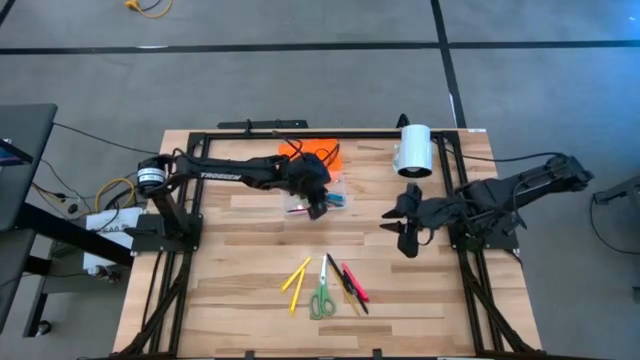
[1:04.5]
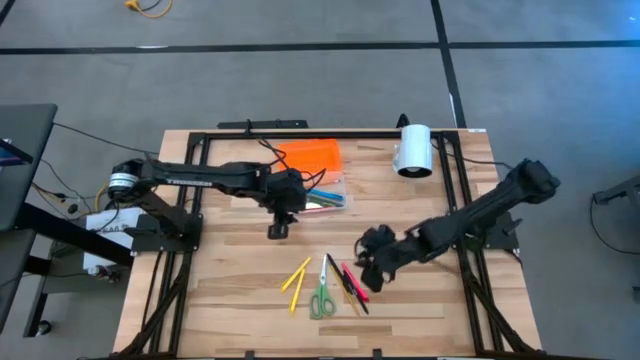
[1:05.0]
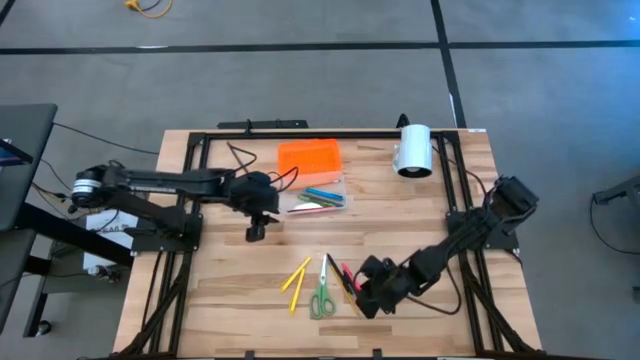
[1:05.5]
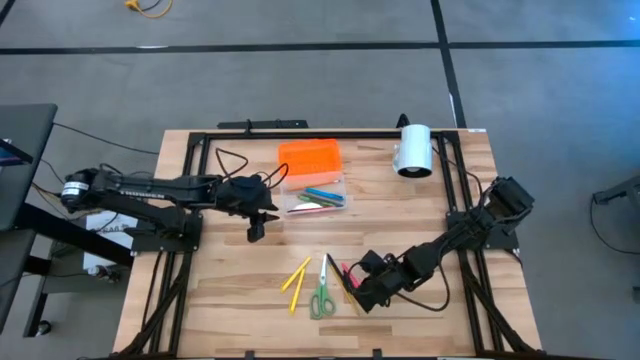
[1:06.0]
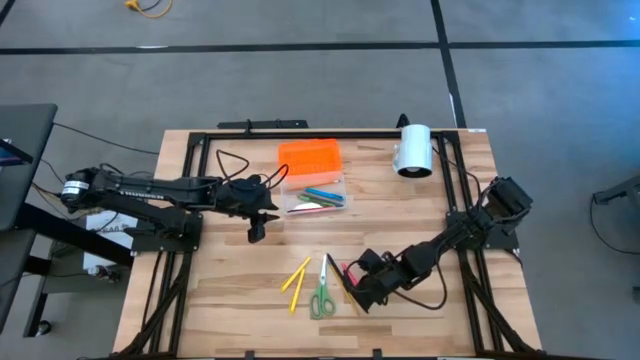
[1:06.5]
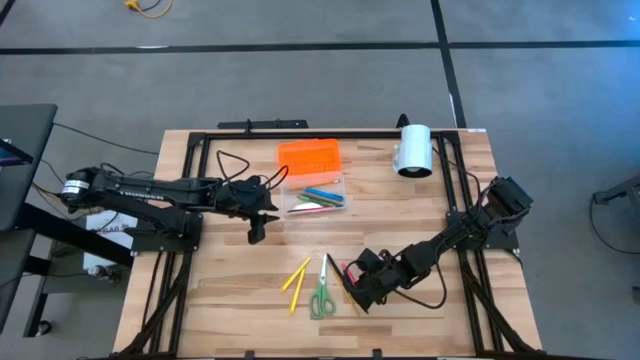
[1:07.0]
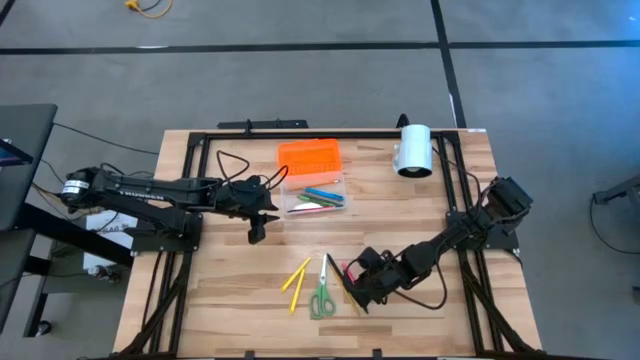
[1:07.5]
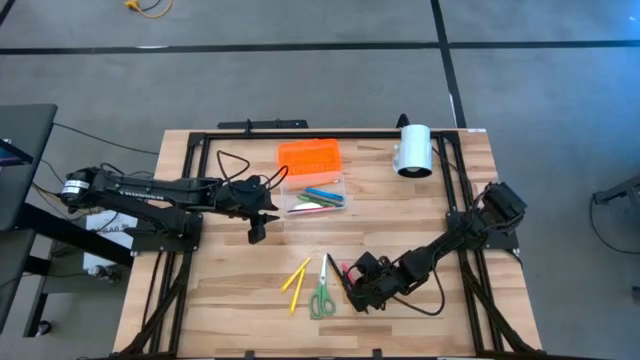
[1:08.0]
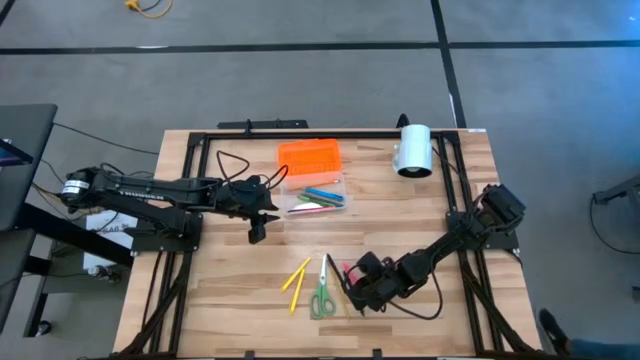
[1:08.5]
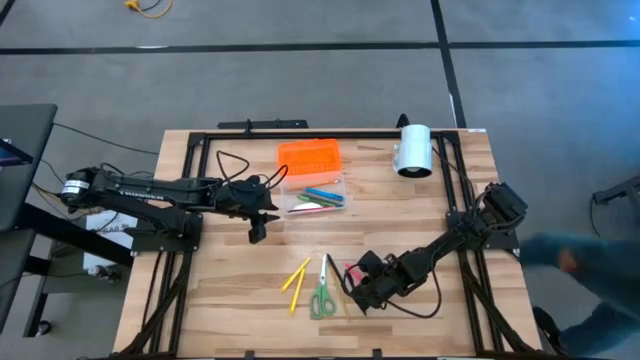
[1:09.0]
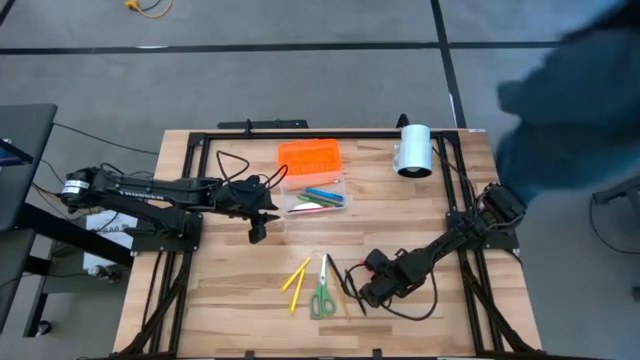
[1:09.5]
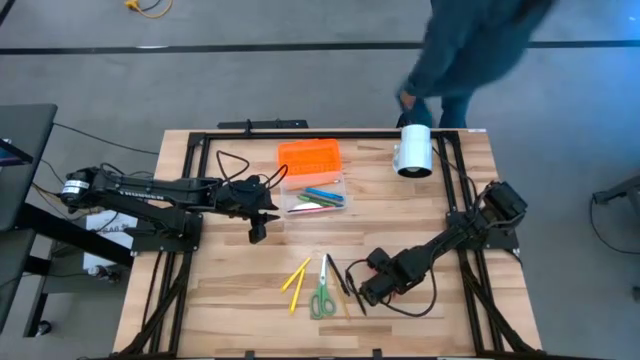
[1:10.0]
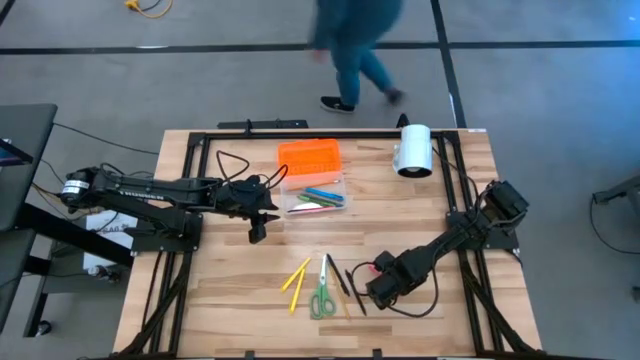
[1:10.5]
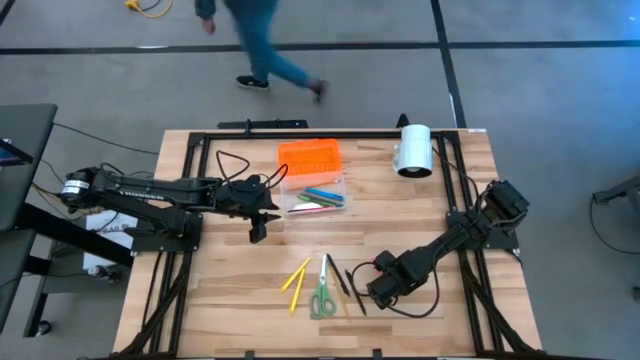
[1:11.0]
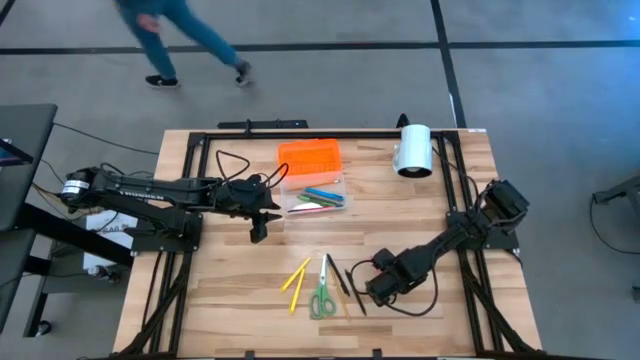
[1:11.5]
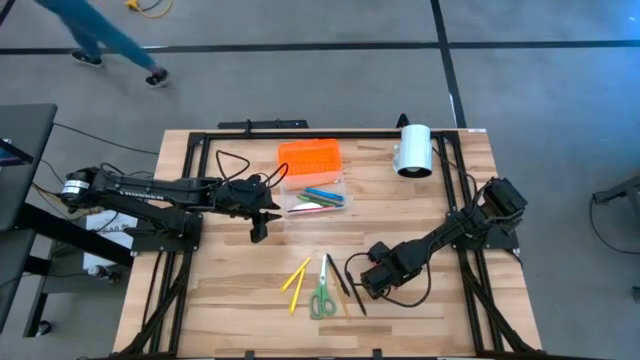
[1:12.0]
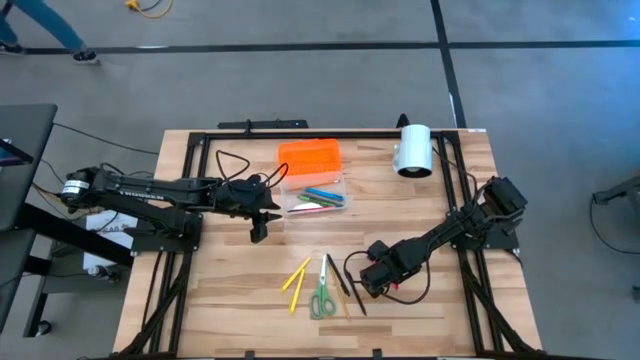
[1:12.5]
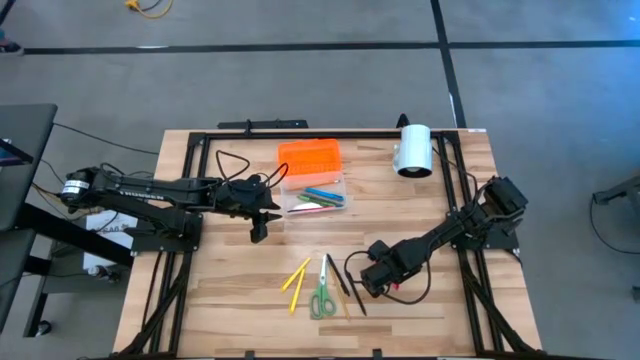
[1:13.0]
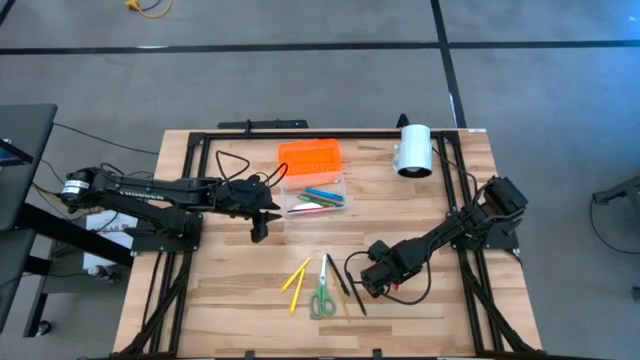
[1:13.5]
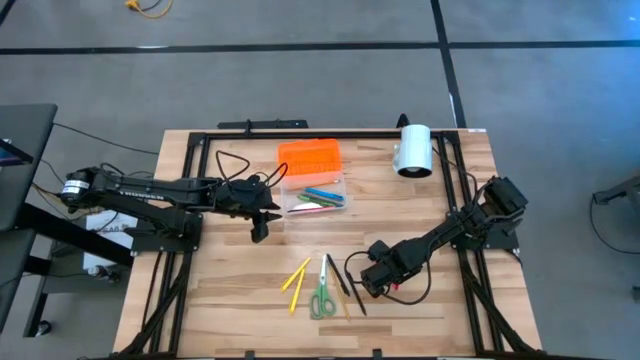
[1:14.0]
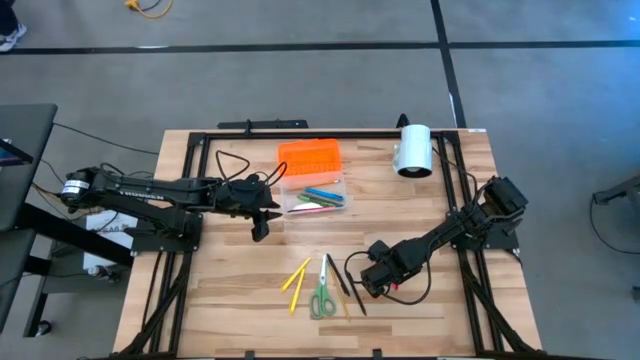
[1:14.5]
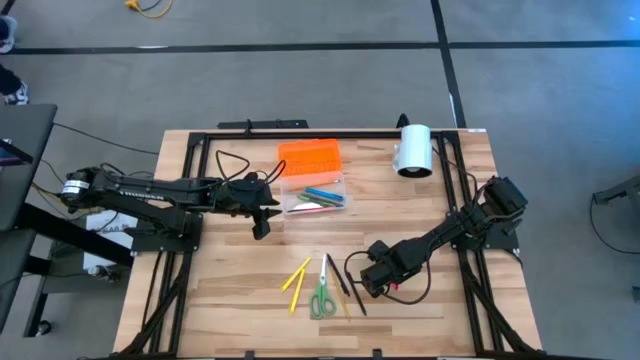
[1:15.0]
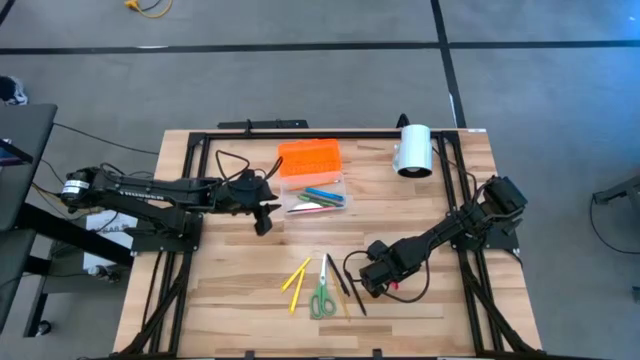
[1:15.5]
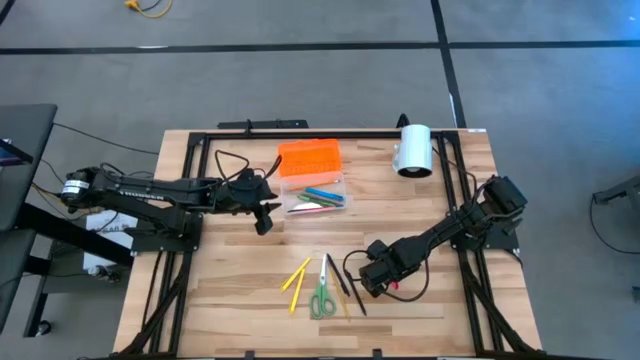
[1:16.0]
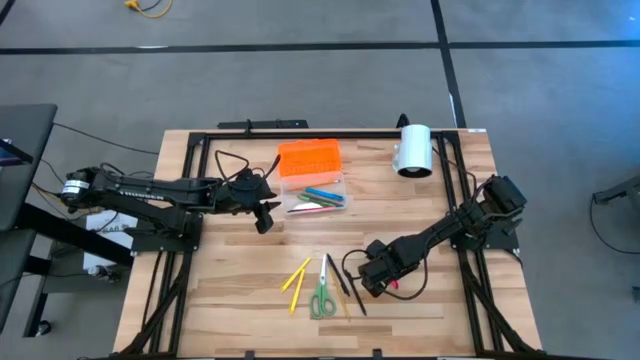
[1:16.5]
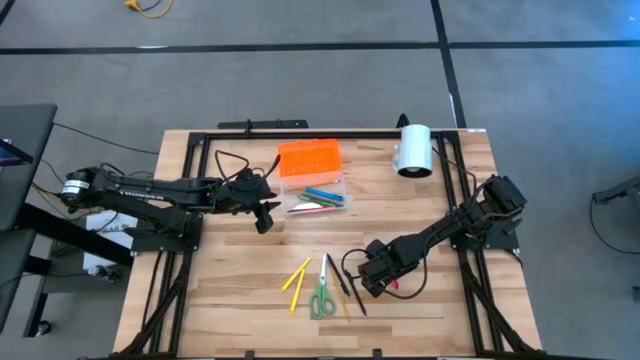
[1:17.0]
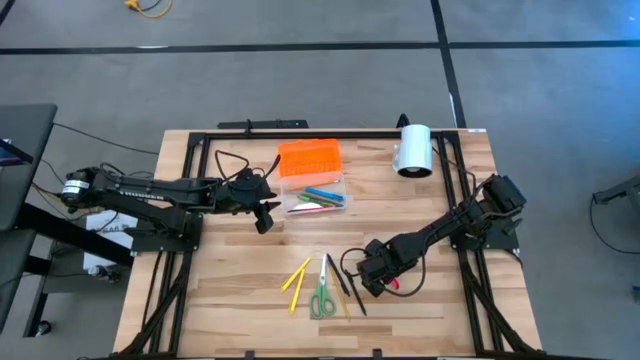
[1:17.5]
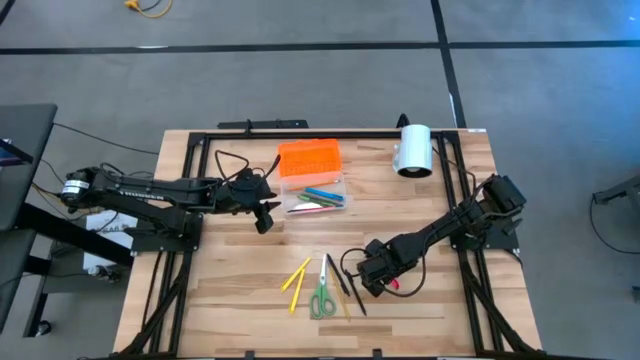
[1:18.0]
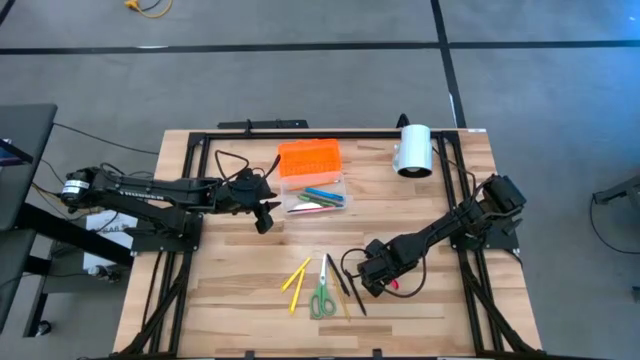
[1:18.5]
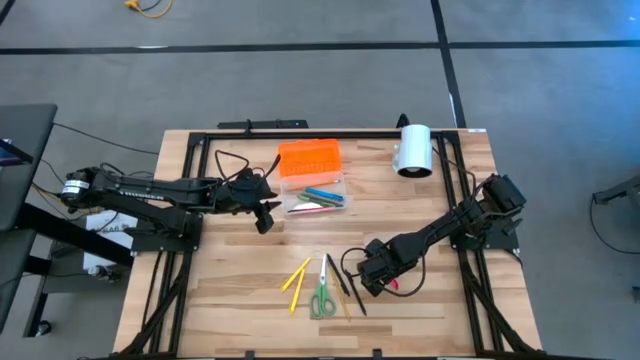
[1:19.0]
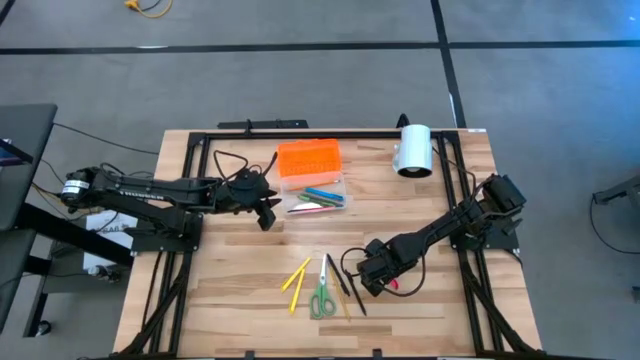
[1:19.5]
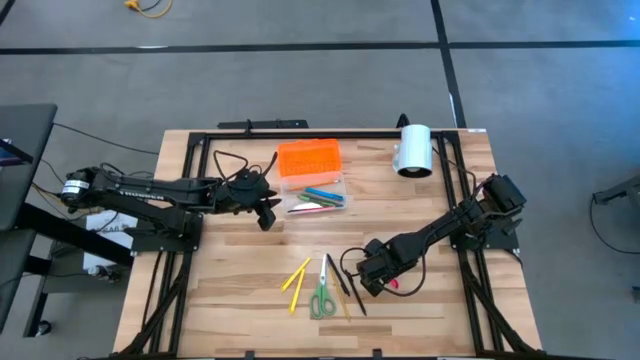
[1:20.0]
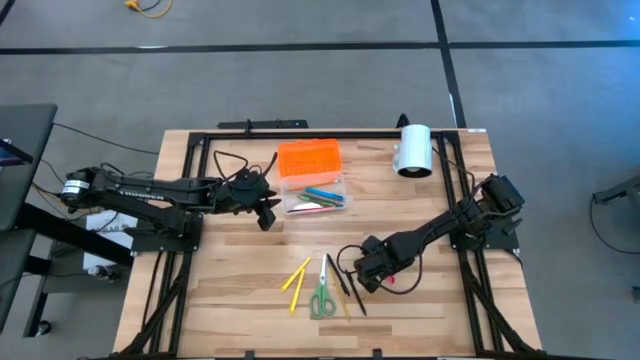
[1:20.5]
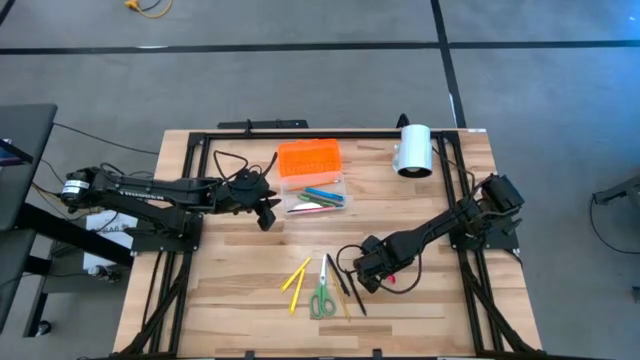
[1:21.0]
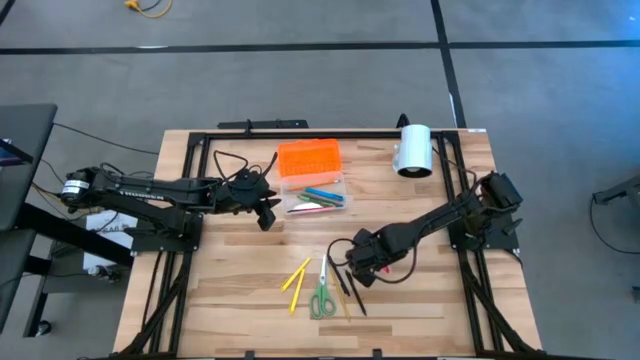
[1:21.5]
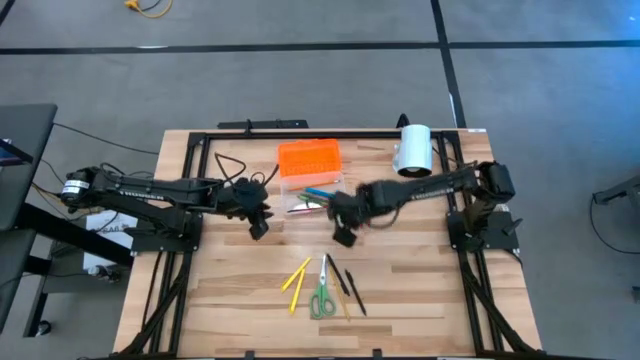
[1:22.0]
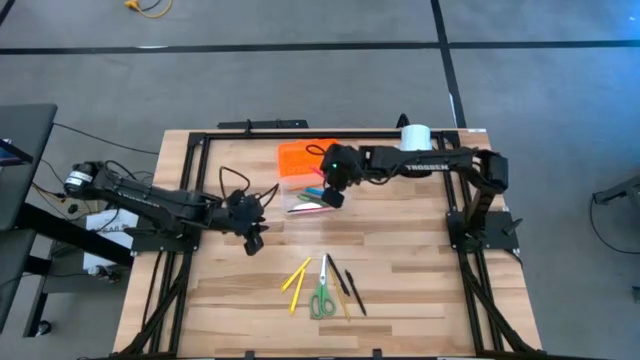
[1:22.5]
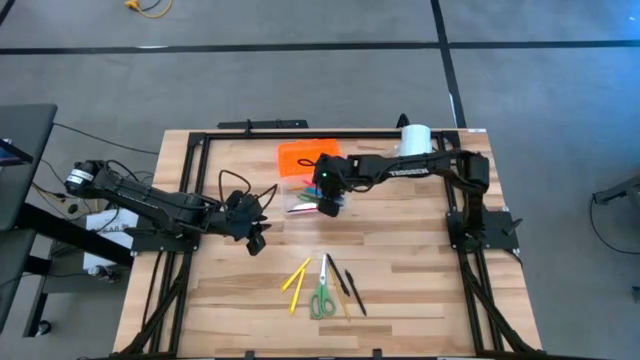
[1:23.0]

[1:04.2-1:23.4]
Task: Pick & place school supplies into a supply box
Put the pink pen into the supply box

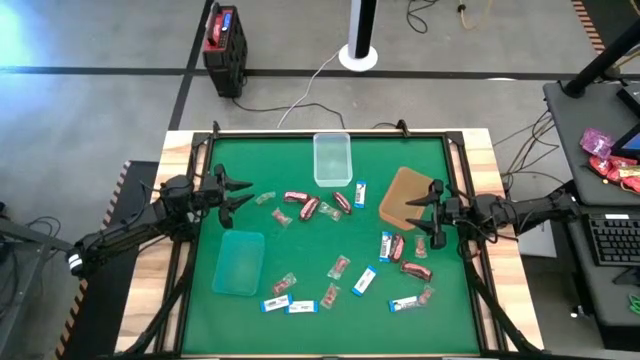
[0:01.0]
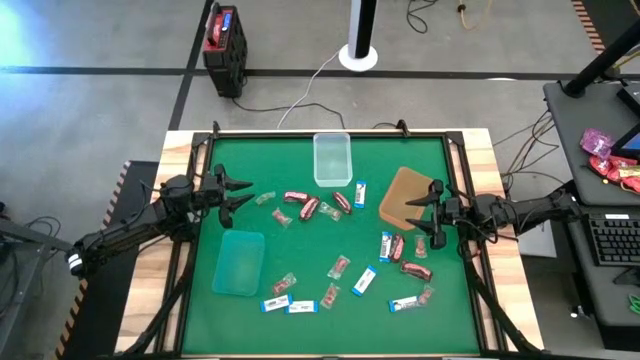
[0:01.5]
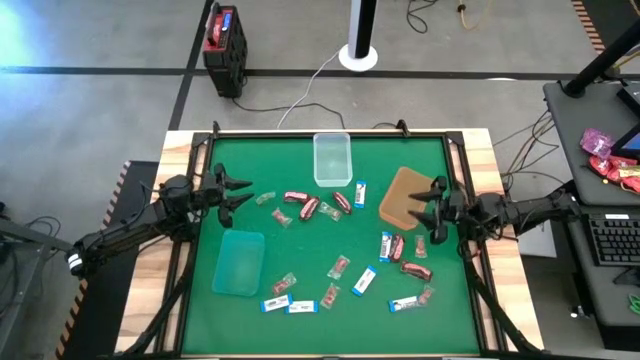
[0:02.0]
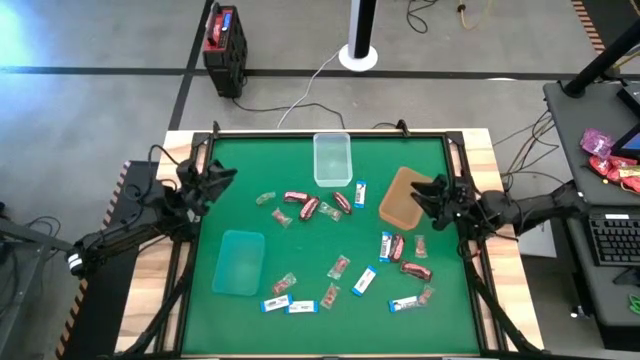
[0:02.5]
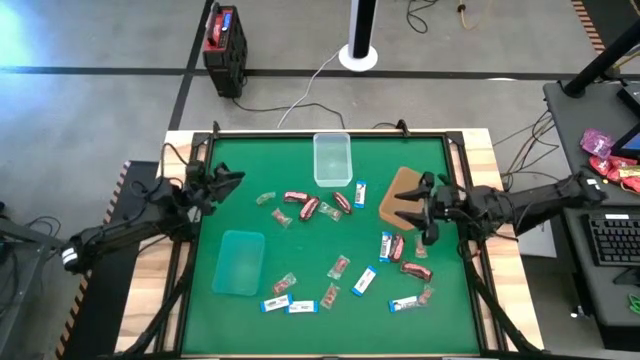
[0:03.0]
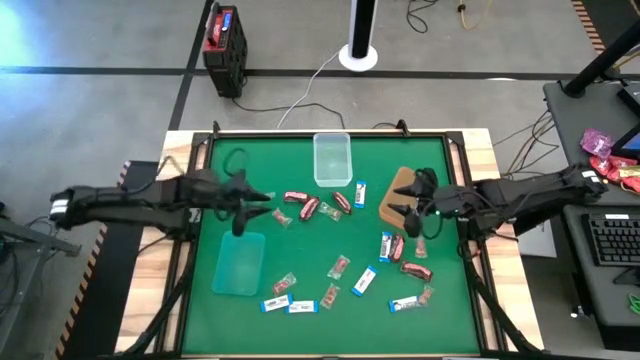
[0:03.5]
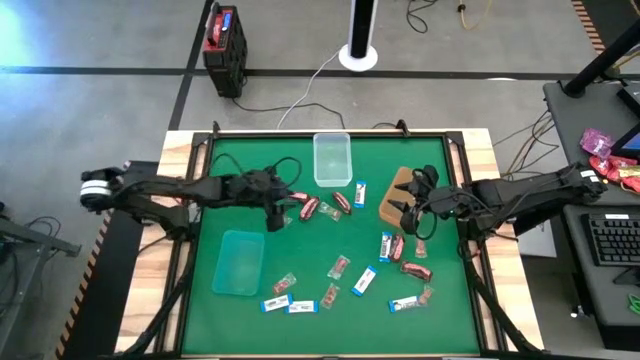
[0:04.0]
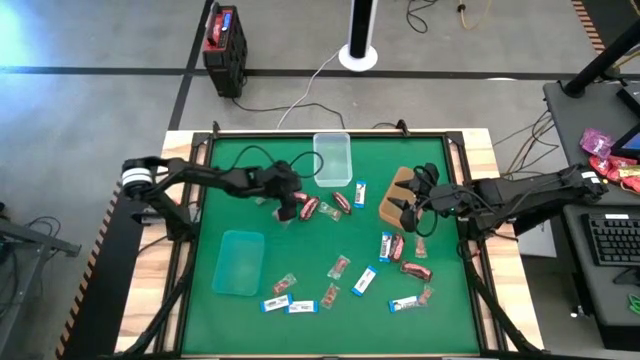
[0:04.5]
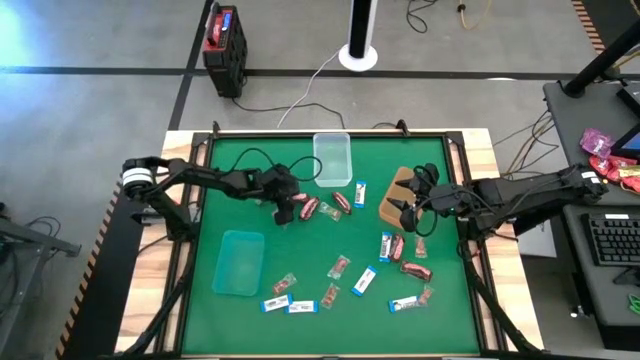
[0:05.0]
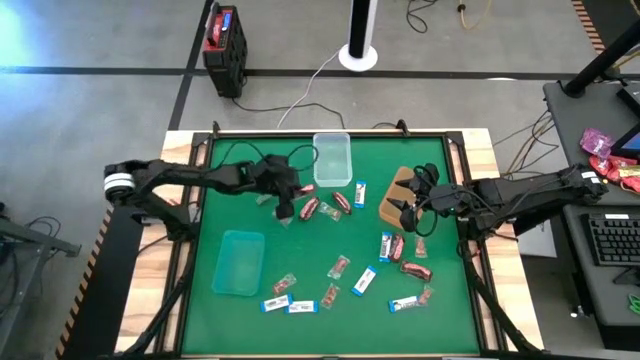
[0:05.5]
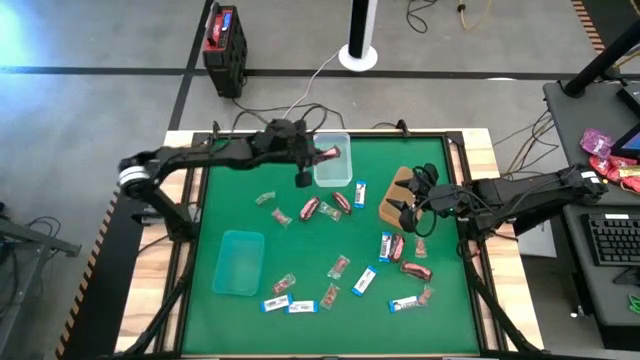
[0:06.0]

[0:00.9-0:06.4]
Task: Sort candy by brand, put in halloween buckets
Put the brown chocolate into the top transparent bin
